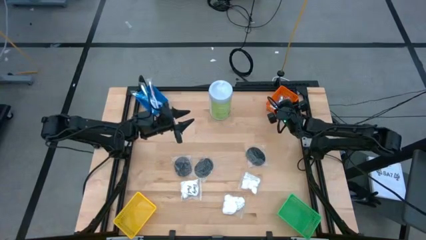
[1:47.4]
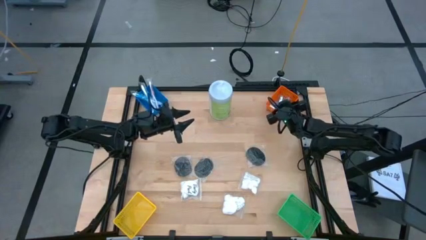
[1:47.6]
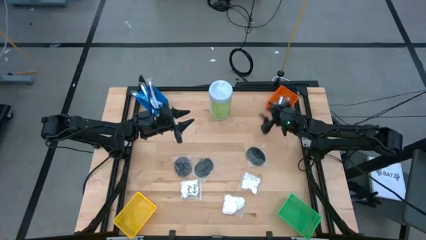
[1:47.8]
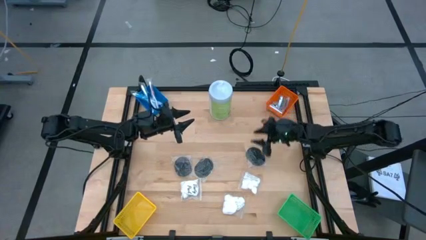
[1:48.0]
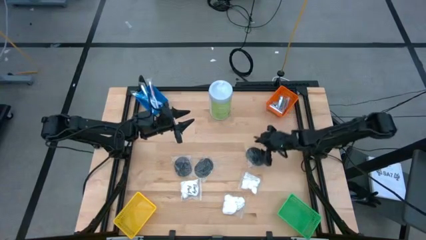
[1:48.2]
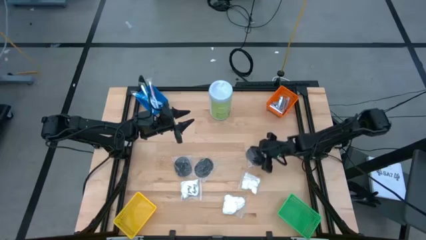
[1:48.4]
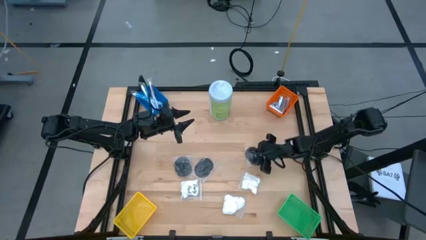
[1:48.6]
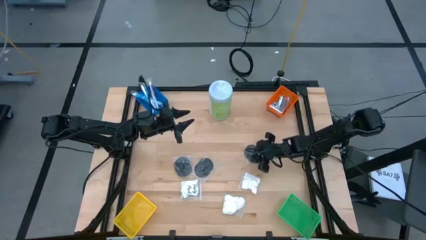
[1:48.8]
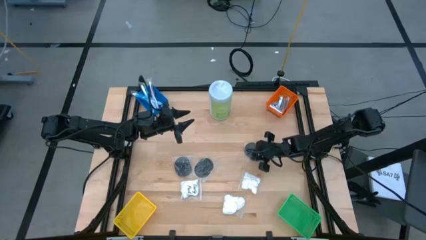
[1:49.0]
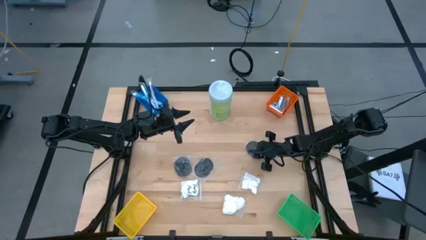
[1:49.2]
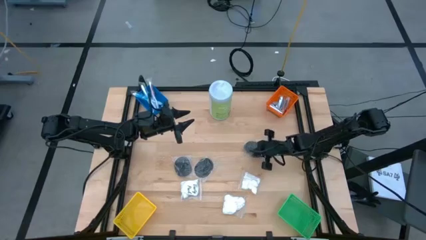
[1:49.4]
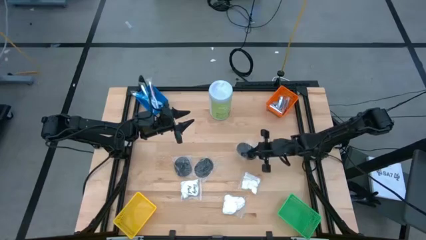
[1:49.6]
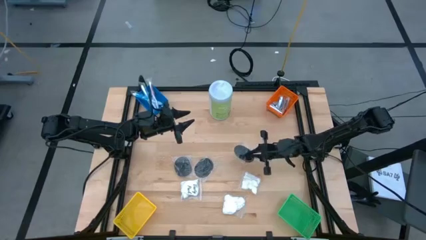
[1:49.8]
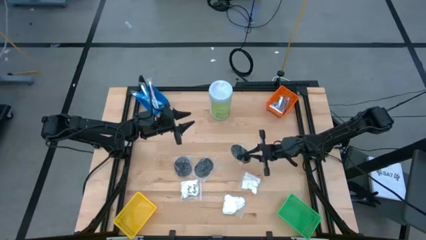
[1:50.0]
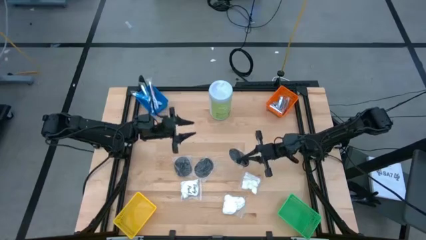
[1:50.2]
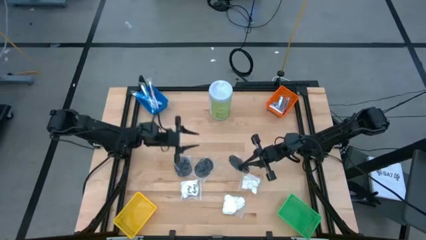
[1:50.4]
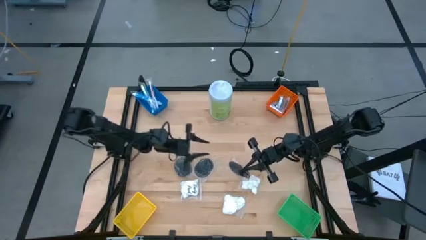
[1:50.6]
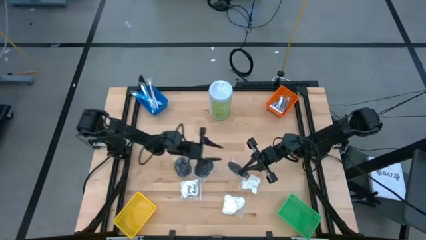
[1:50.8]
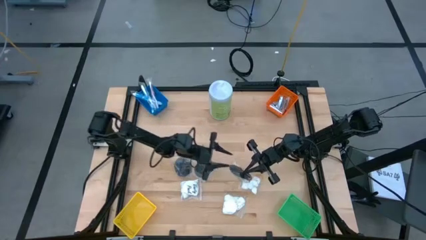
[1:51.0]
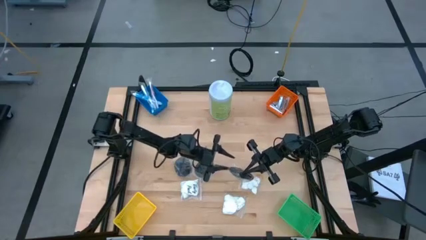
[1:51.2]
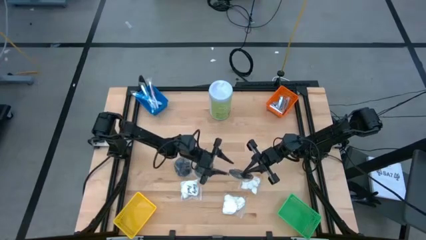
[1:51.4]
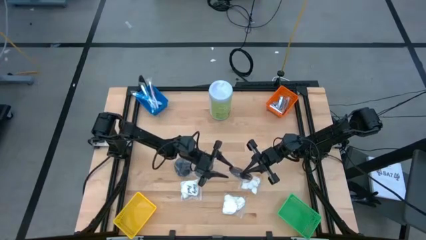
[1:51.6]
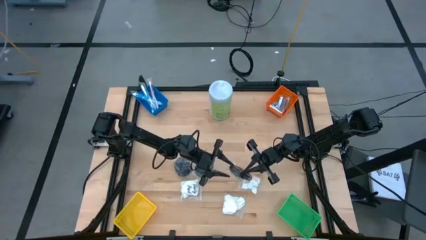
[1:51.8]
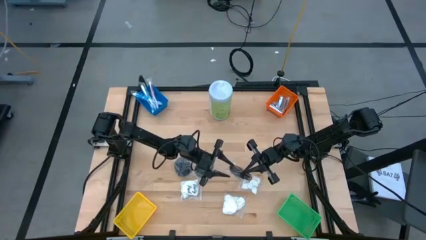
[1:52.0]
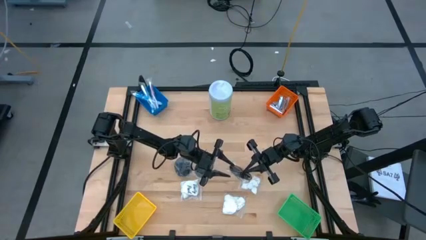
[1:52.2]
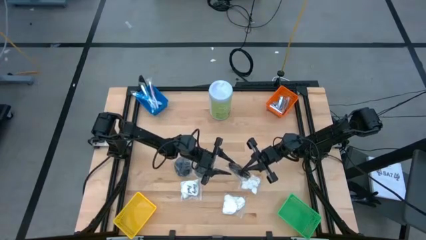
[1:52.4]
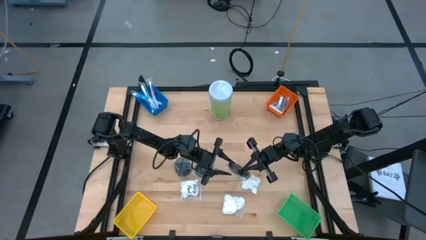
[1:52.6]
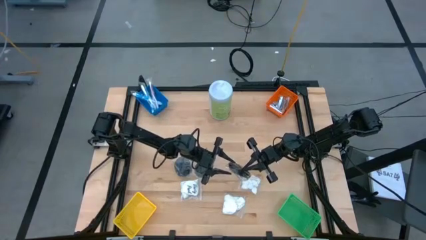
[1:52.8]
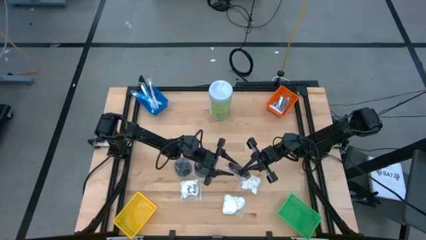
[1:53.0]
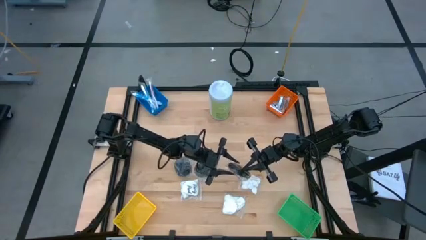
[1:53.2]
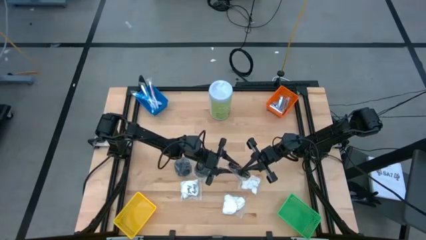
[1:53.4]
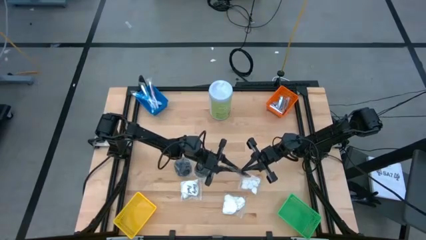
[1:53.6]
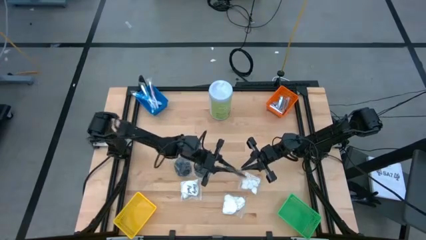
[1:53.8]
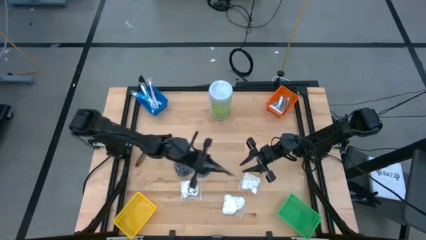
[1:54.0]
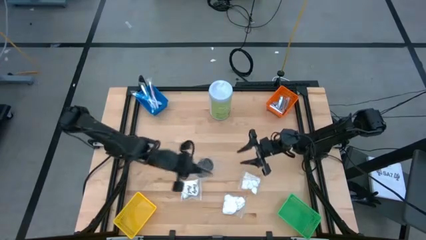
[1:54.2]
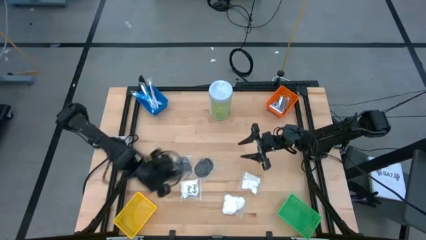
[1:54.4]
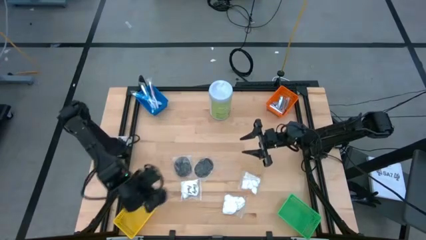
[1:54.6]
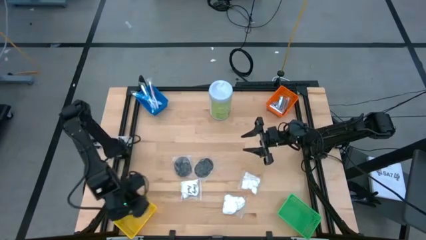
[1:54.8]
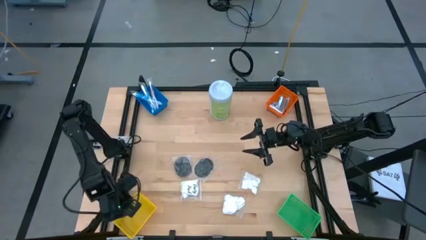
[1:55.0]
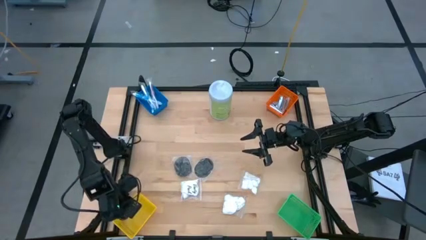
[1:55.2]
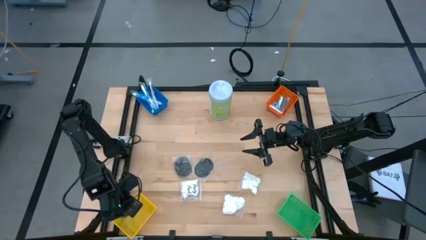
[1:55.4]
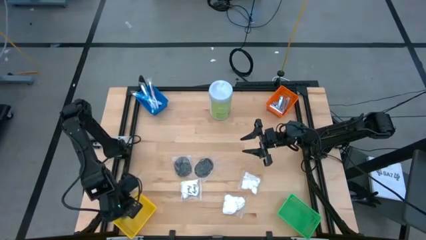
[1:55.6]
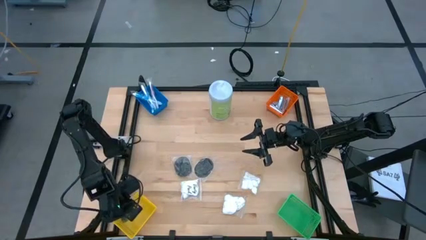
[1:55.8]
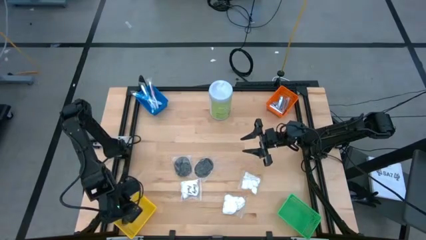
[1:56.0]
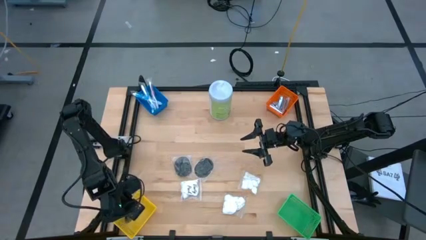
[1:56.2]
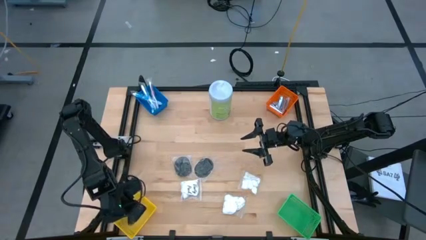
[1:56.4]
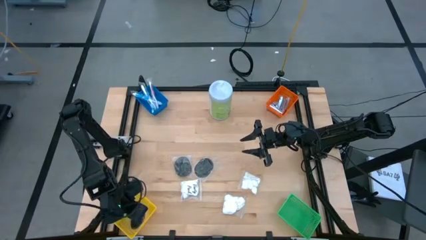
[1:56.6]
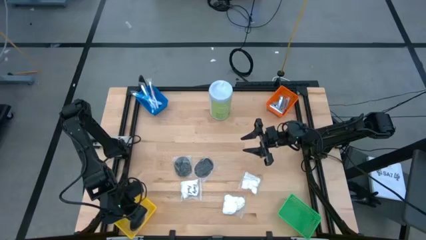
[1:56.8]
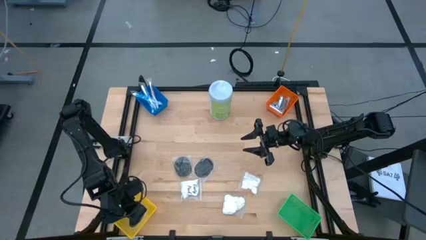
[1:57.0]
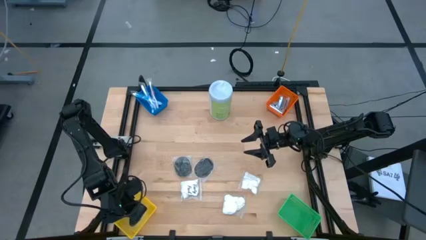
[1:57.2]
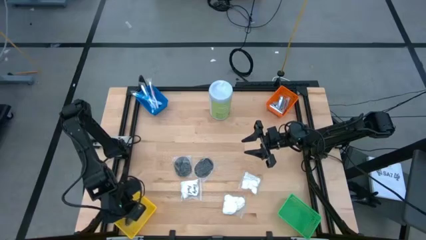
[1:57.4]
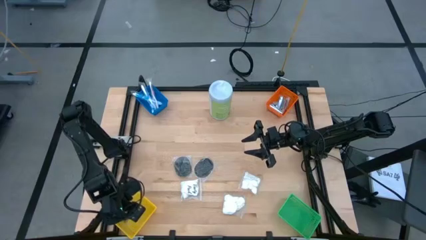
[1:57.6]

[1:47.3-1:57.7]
Task: Pick & Place Travel size toiletries
Put the black hairbrush into the yellow bin

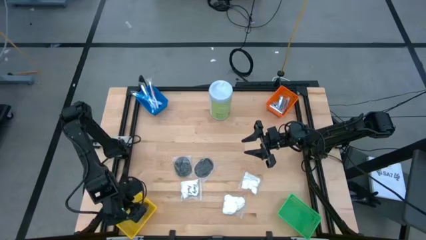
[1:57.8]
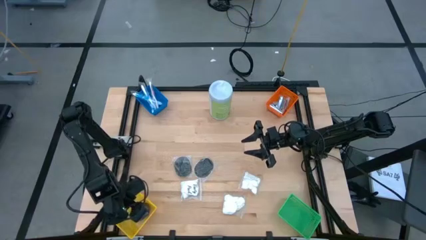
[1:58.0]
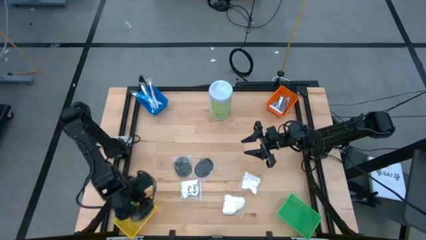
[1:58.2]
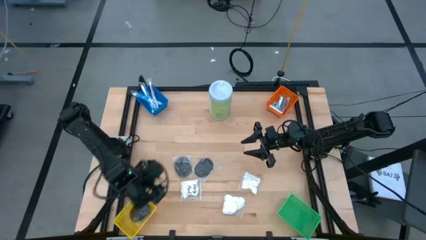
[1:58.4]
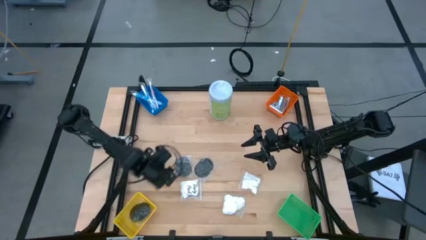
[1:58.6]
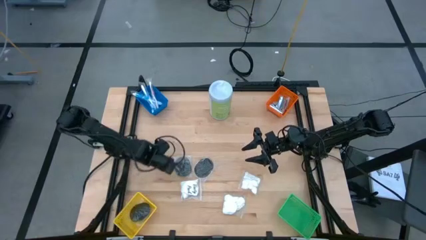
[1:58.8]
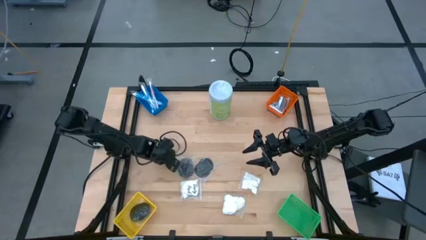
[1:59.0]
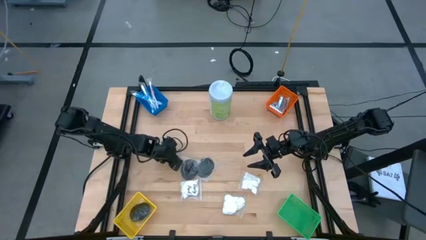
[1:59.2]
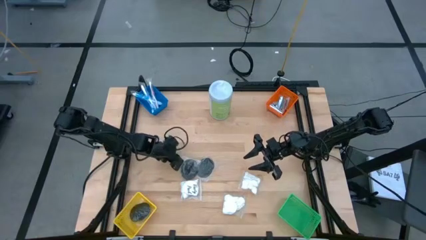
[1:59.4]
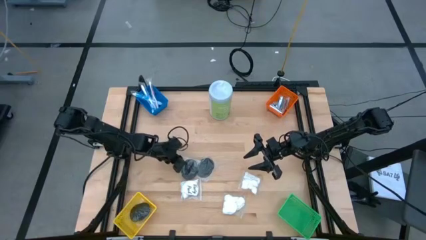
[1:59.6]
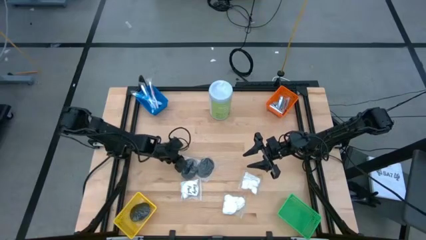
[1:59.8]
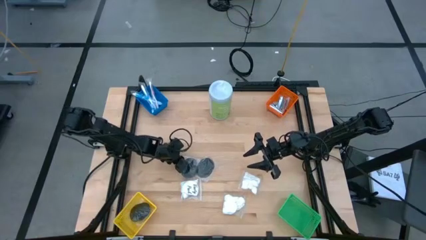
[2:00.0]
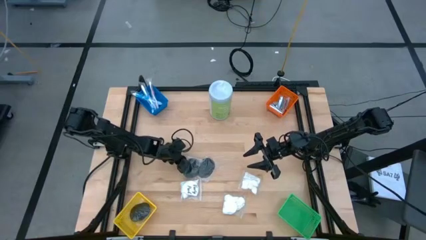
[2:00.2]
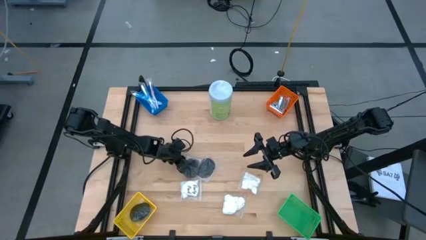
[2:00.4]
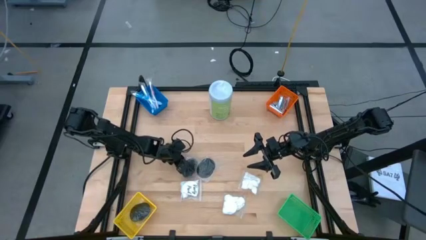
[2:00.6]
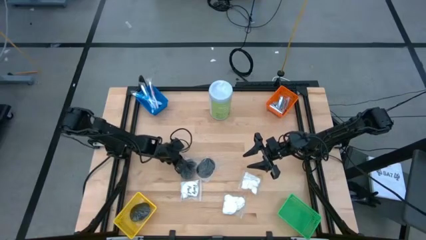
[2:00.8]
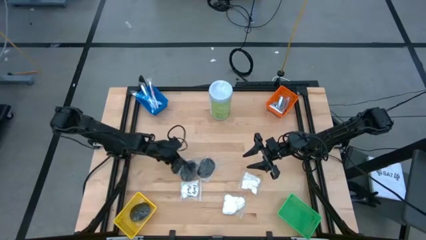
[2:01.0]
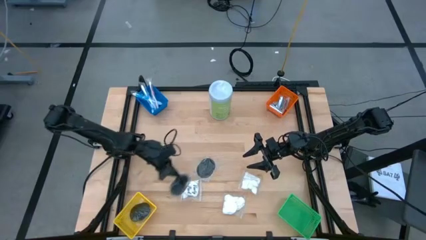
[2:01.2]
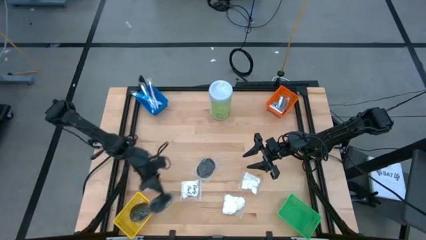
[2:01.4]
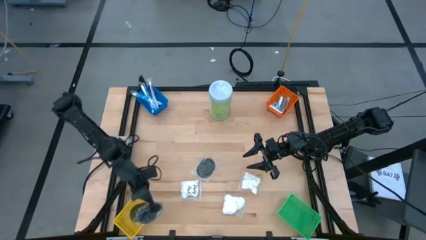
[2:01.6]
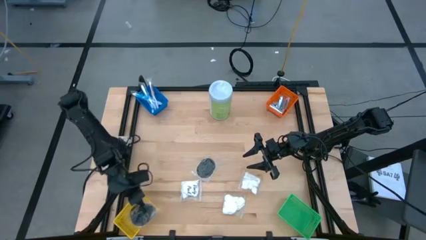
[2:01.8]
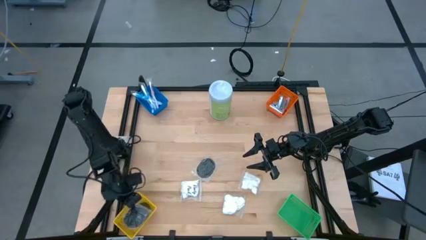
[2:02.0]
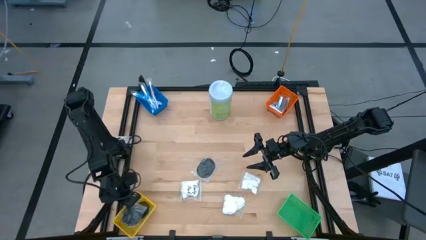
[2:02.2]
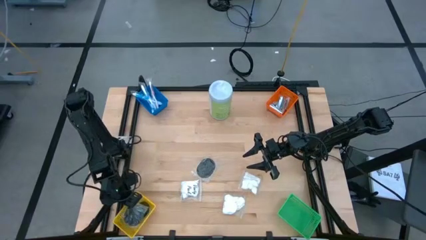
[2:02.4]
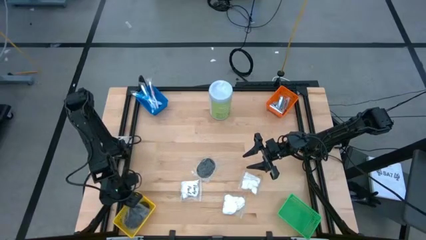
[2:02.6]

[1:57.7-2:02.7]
Put the black hairbrush into the yellow bin

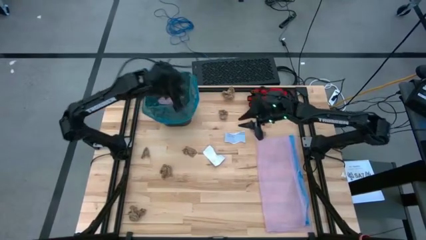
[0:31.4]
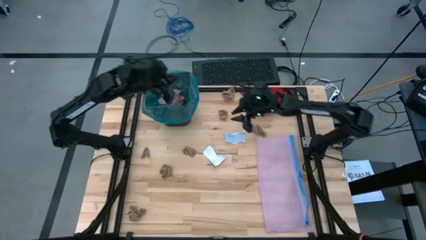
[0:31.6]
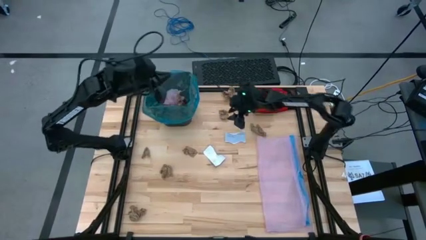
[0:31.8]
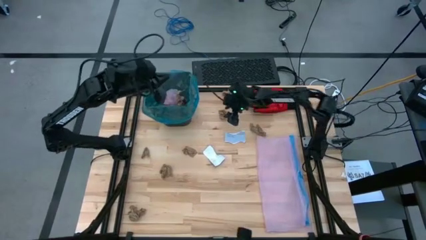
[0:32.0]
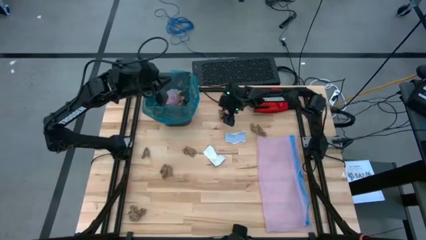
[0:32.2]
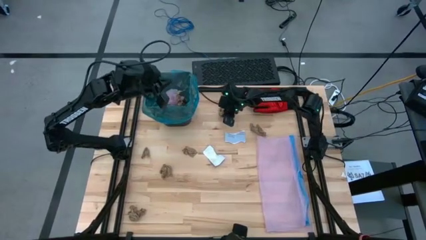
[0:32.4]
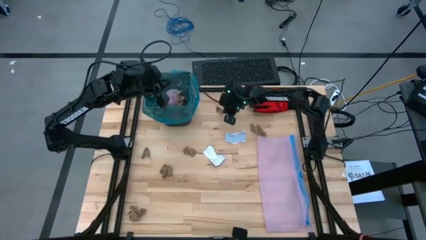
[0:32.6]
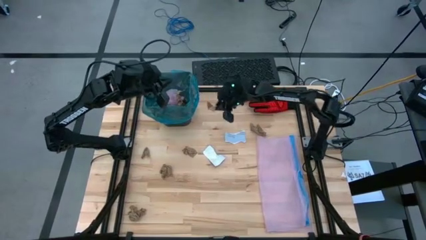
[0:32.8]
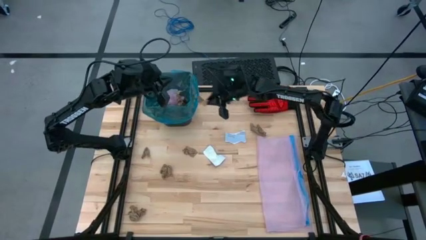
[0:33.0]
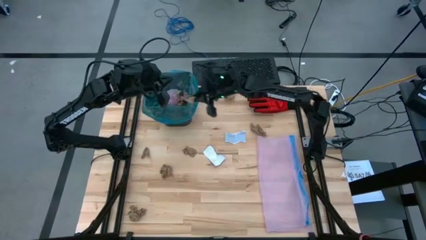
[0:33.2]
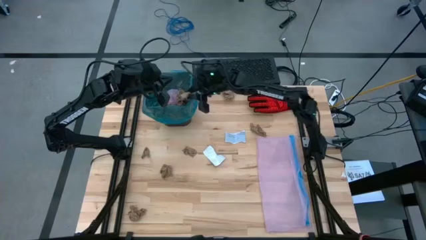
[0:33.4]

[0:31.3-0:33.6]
Task: place trash/remove bag and relplace
Put the brown napkin into the trash bin
